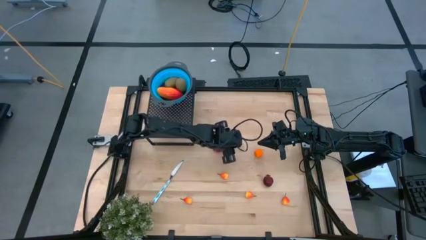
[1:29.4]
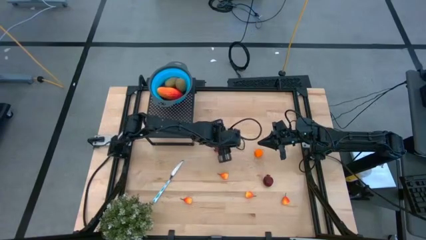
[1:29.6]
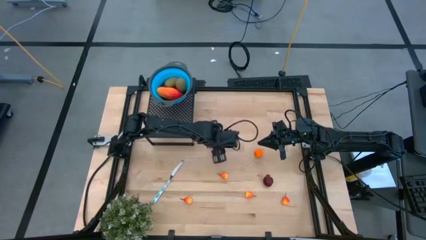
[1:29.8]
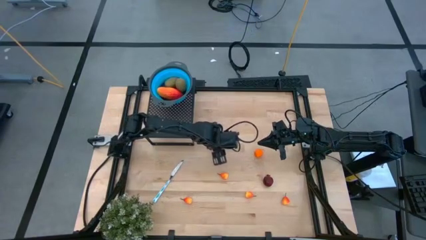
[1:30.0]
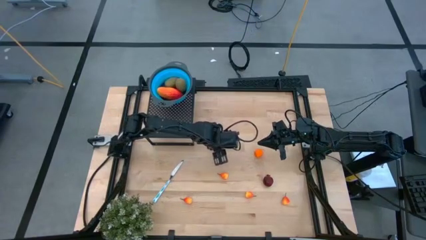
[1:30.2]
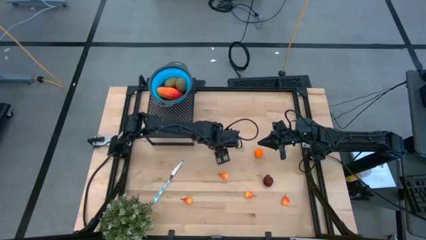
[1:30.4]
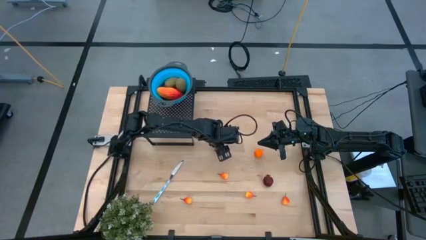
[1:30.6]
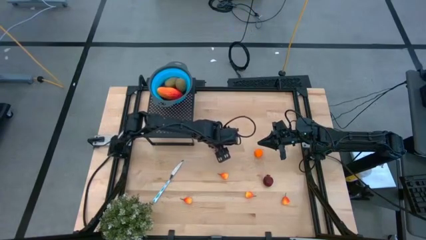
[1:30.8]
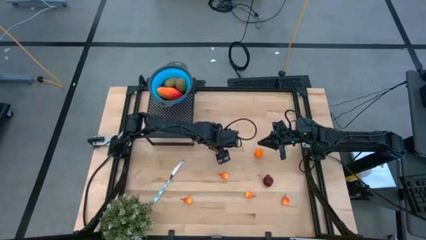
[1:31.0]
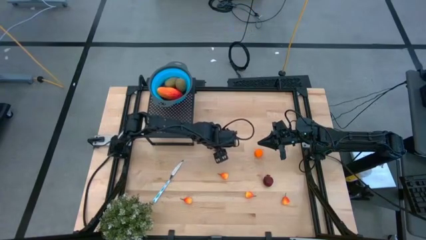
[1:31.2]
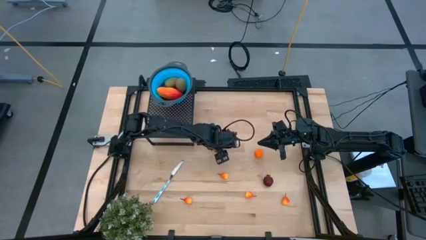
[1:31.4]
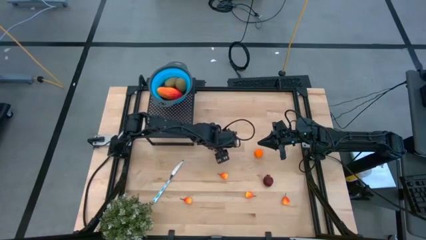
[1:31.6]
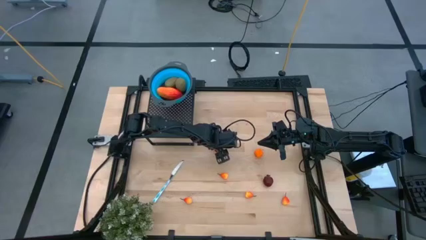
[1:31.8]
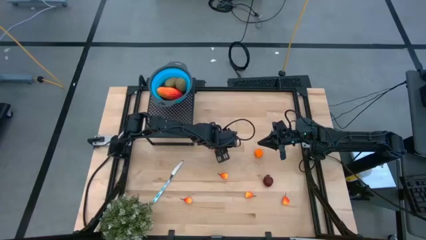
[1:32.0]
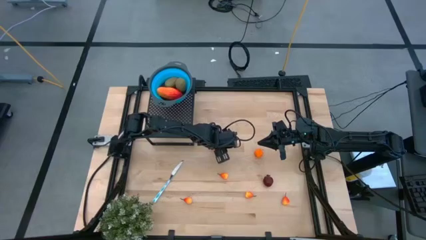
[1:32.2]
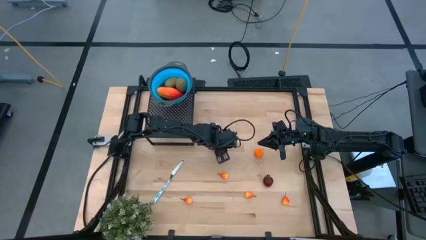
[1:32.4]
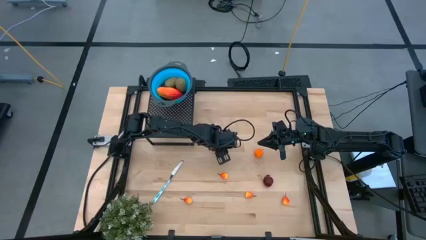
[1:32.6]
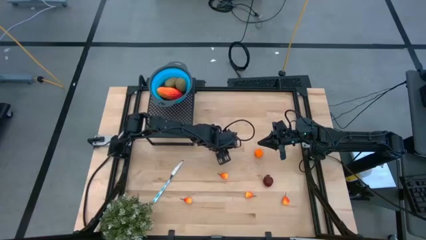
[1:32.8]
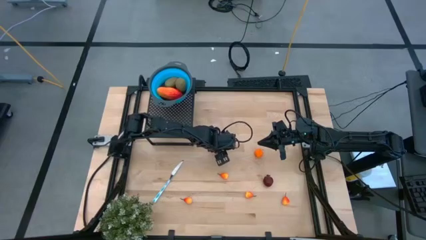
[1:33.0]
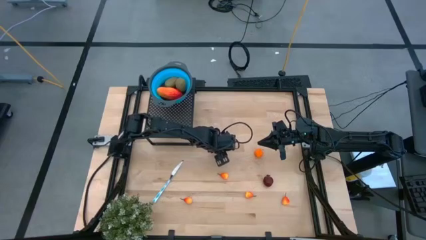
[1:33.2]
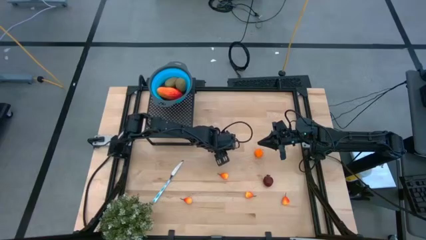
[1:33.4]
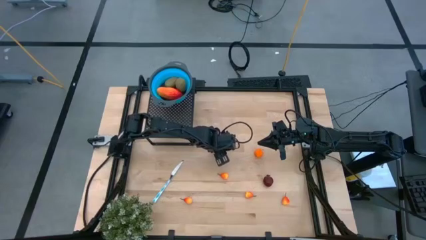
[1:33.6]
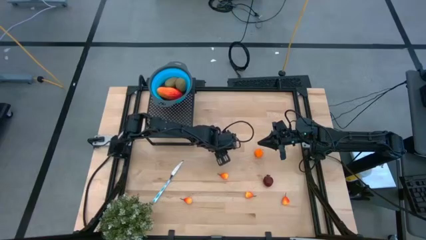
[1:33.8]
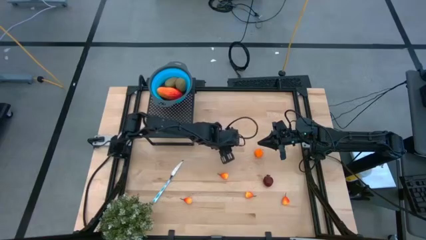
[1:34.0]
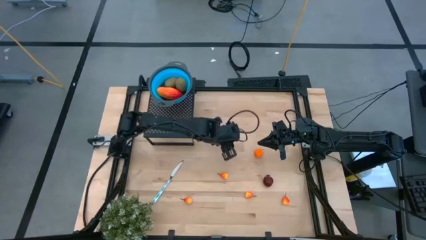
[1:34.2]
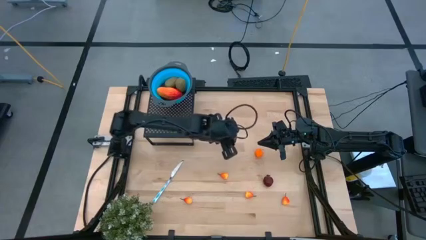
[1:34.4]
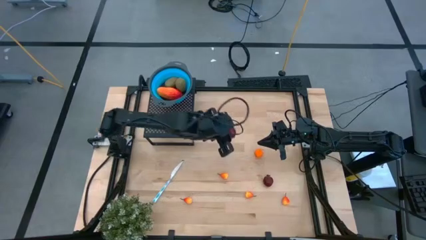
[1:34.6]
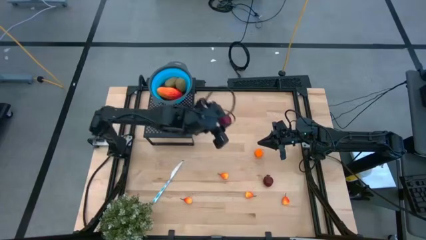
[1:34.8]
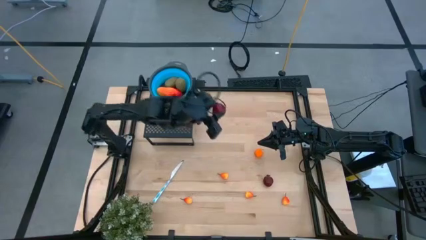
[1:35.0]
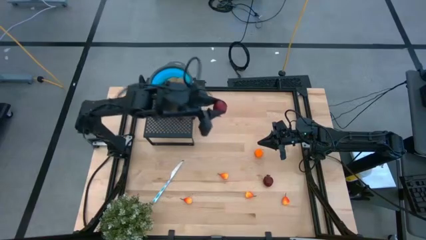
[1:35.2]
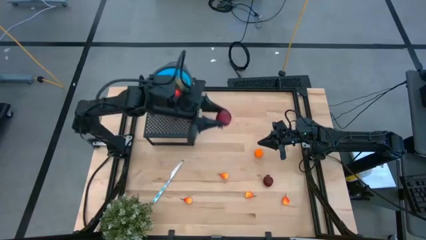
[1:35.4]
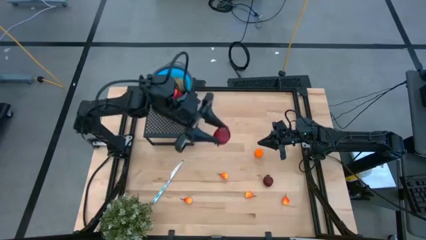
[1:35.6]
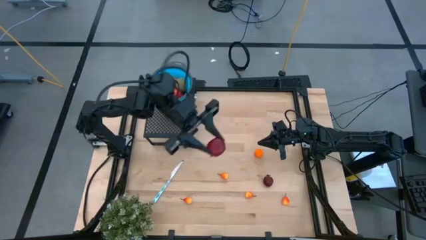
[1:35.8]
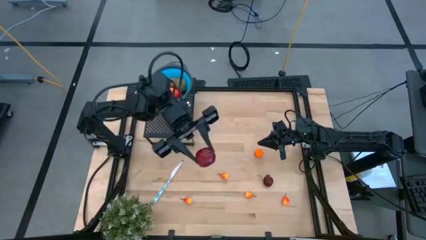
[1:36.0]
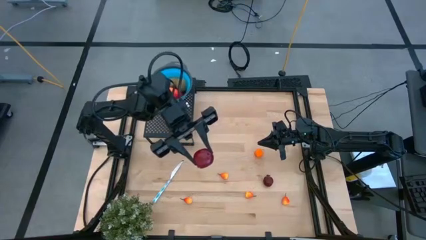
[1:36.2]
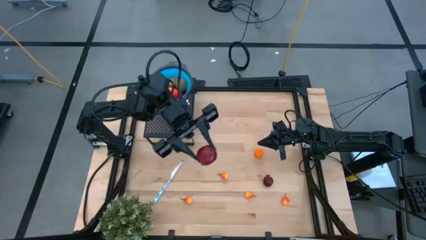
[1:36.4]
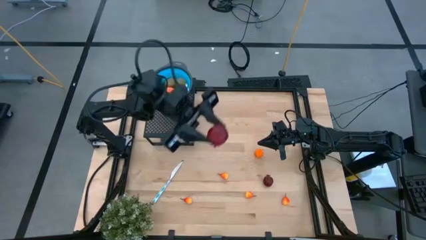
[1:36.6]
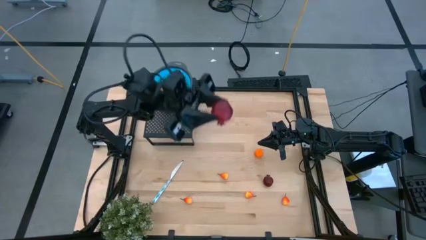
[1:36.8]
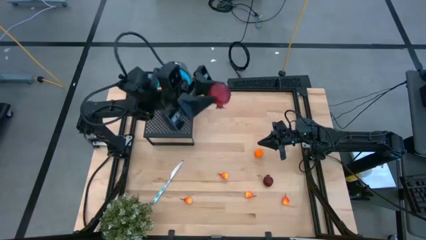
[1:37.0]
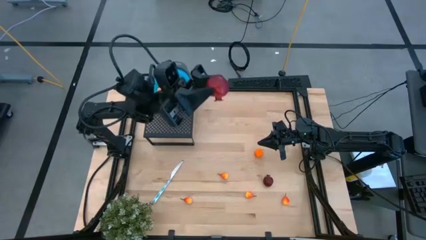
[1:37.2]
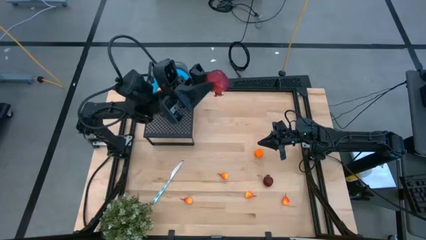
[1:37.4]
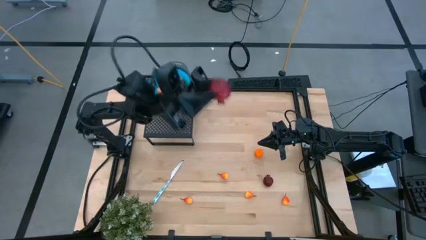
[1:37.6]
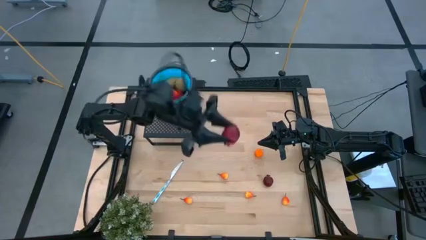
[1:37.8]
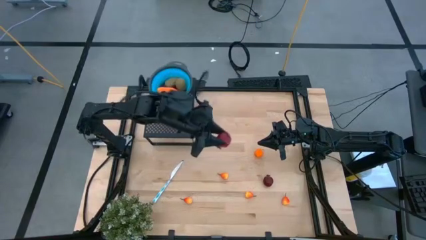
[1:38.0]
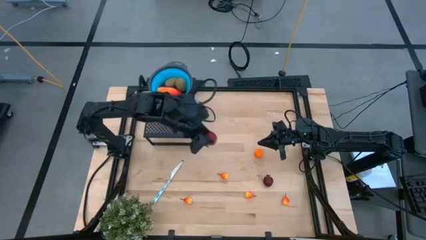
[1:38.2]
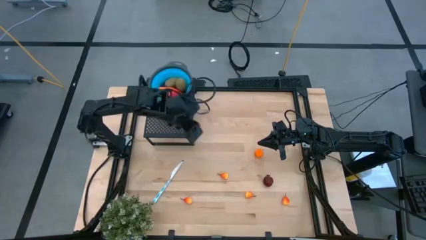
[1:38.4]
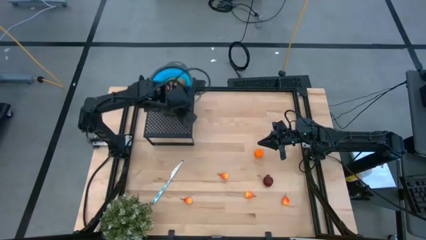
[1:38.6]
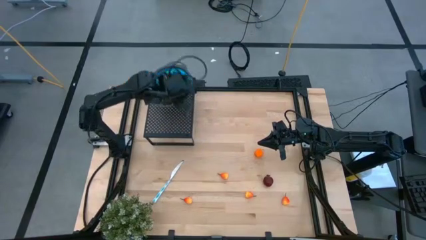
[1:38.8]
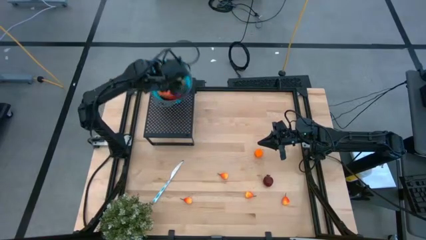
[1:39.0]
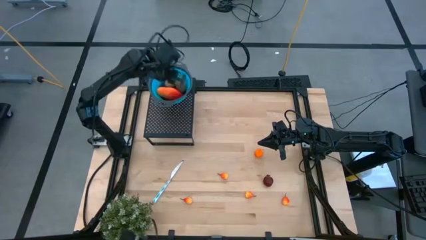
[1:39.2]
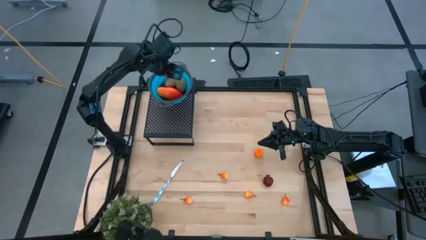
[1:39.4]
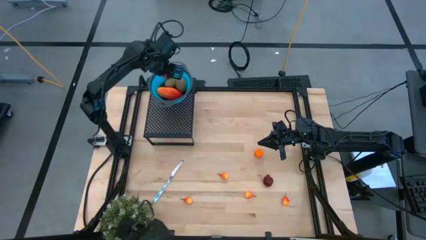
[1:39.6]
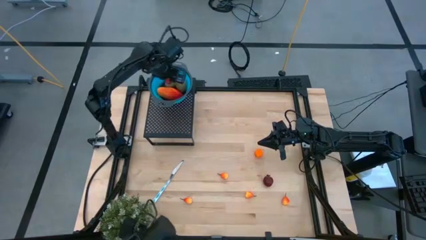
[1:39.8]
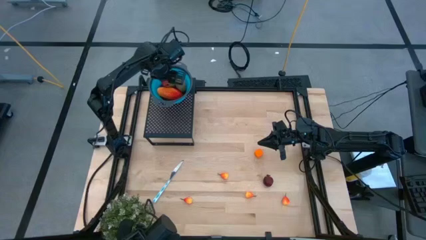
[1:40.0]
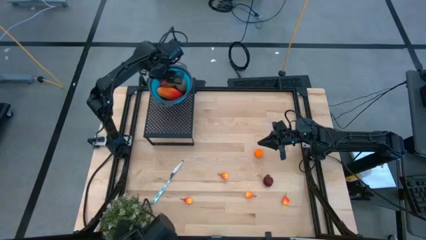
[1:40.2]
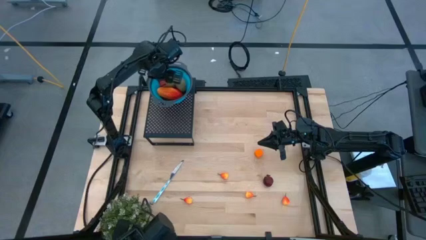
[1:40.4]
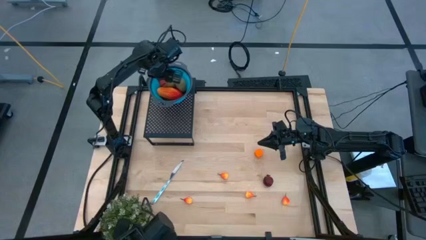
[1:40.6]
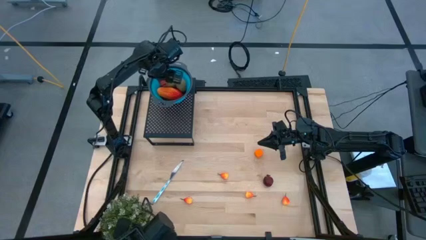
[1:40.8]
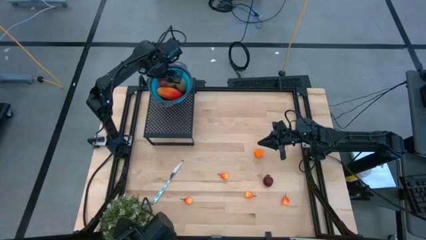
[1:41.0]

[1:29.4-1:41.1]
Task: Pick & Place Fruit
Put the red pomegranate into the blue strainer bowl on the shelf

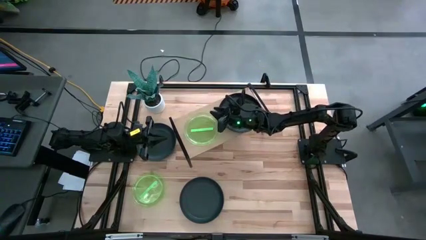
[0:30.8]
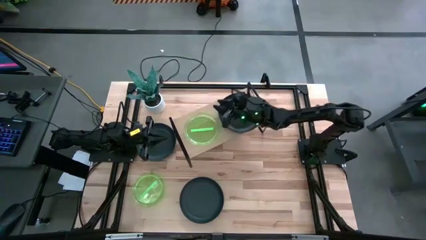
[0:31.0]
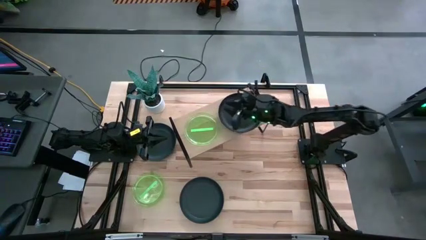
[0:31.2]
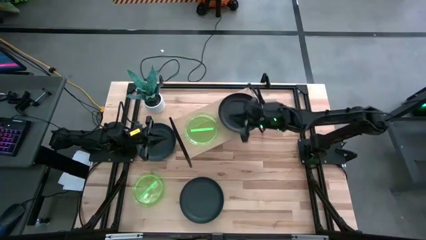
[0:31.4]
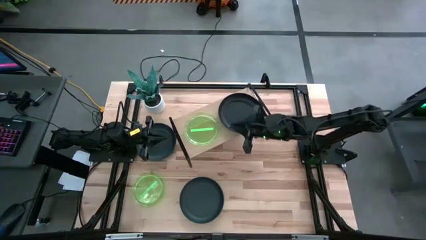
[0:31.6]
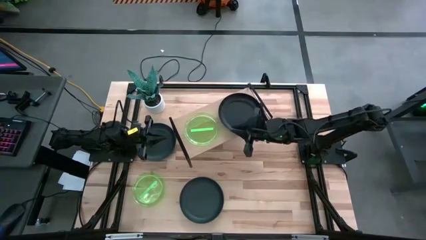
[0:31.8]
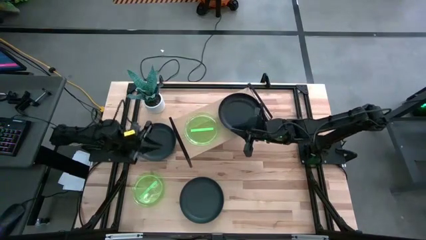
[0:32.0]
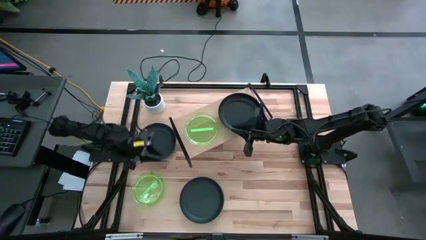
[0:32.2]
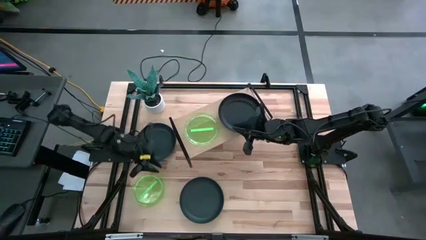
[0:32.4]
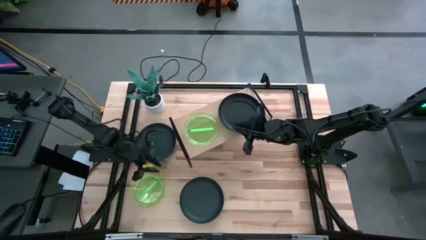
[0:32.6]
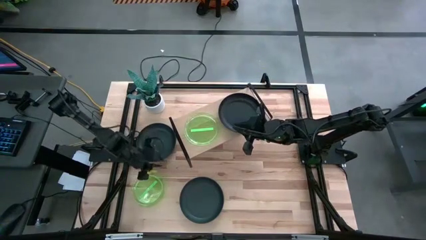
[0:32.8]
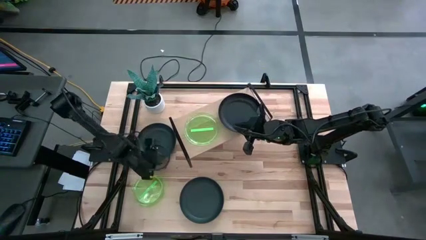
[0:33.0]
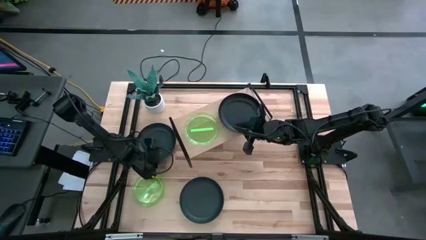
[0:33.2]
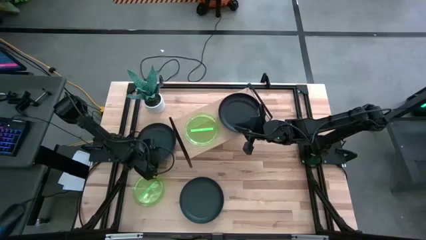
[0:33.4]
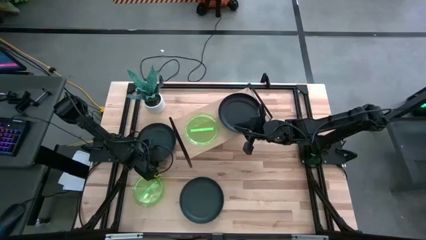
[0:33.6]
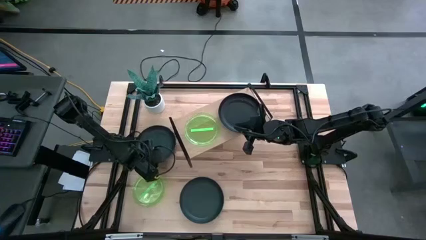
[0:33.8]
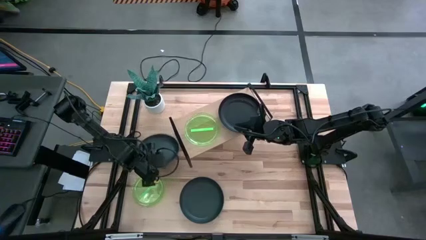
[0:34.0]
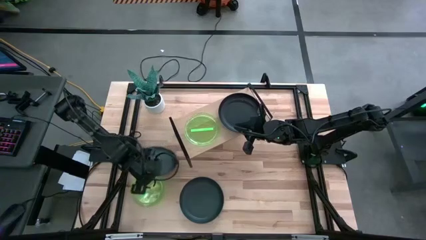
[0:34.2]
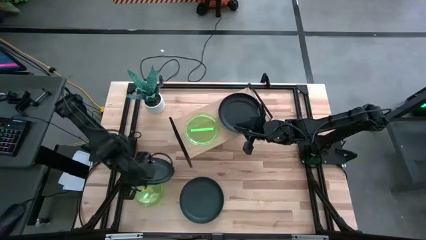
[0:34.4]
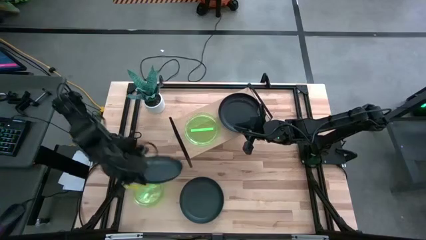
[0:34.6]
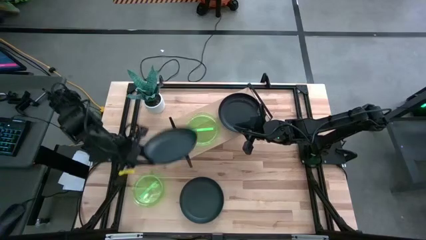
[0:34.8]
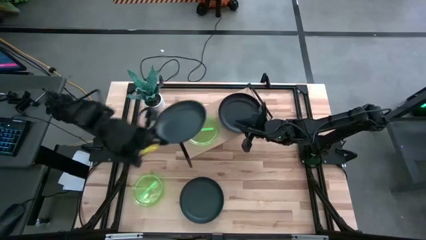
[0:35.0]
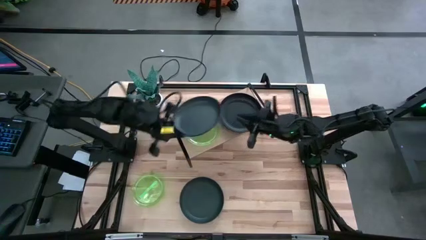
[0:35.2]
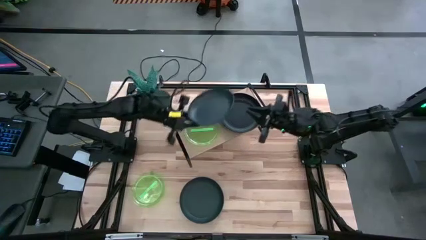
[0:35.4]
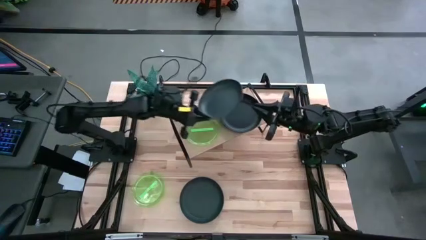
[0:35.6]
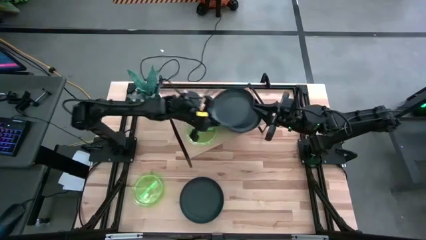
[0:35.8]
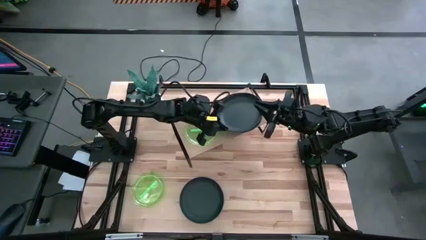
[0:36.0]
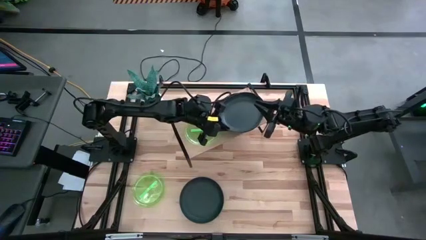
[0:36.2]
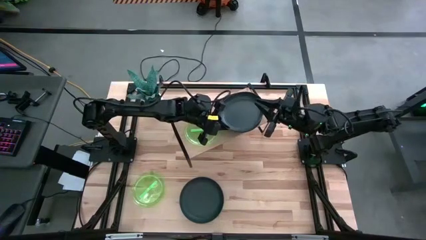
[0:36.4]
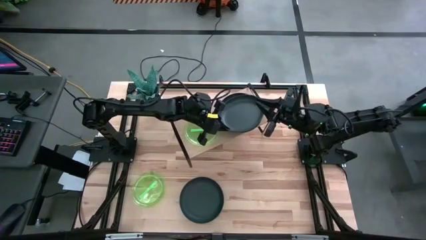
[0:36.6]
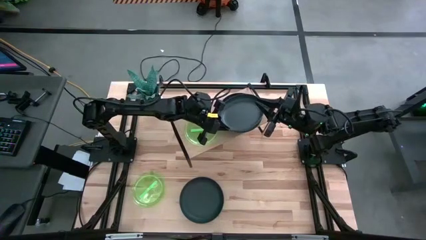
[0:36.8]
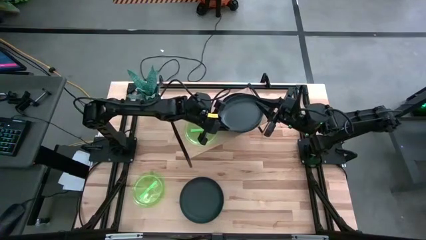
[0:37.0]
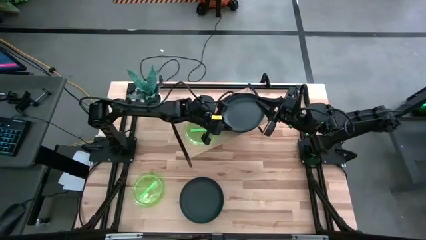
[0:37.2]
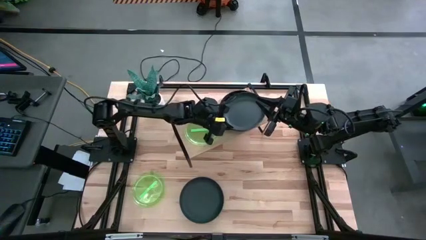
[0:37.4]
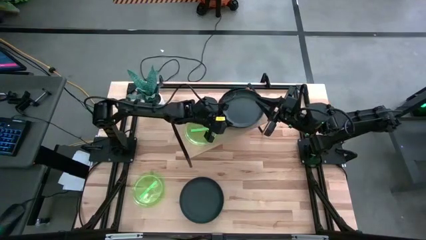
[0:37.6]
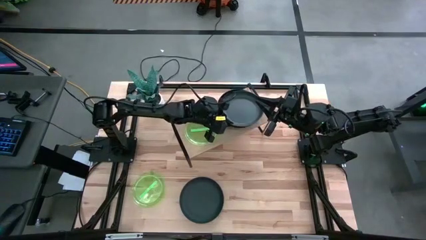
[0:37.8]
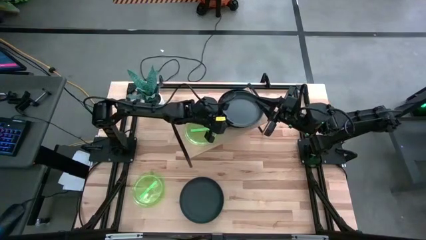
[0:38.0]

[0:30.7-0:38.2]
Task: Place and stack plates onto a shelf
Stack the top black plate on top of the other black plate on the shelf
